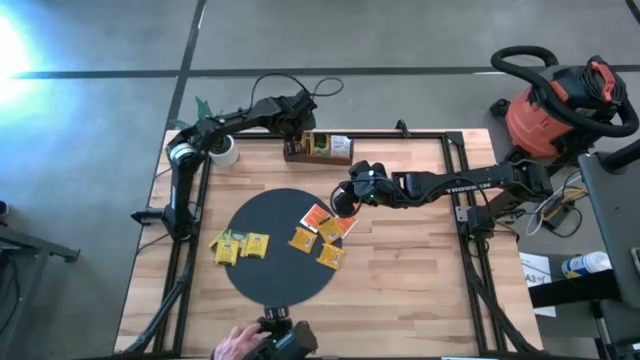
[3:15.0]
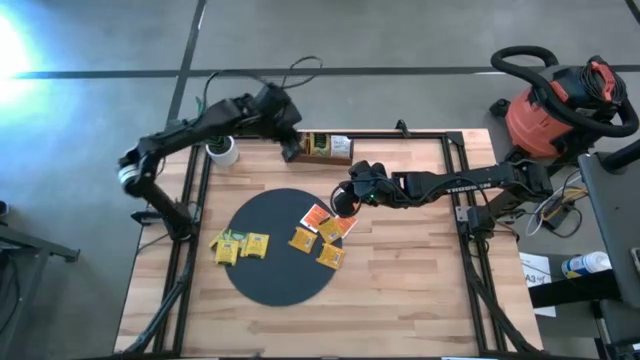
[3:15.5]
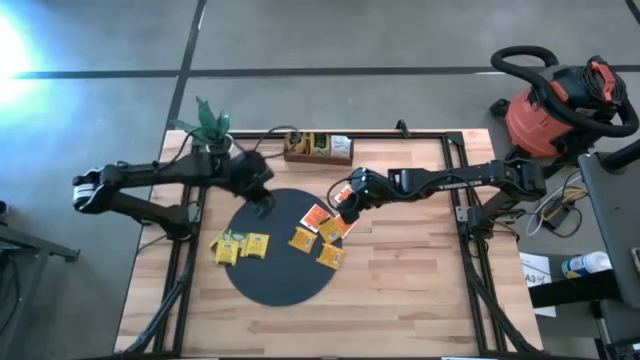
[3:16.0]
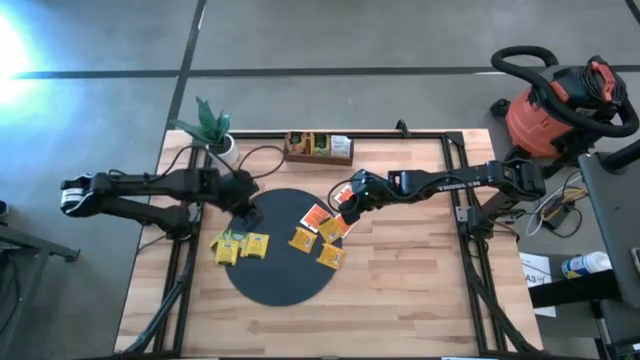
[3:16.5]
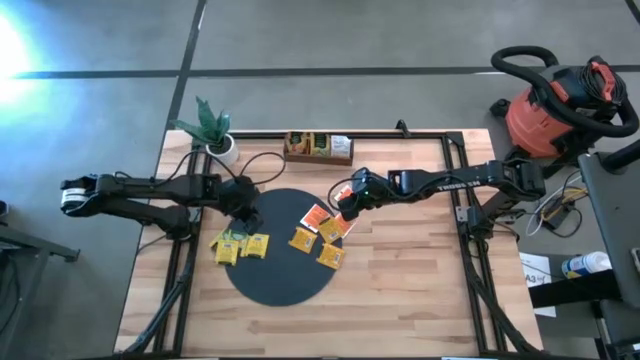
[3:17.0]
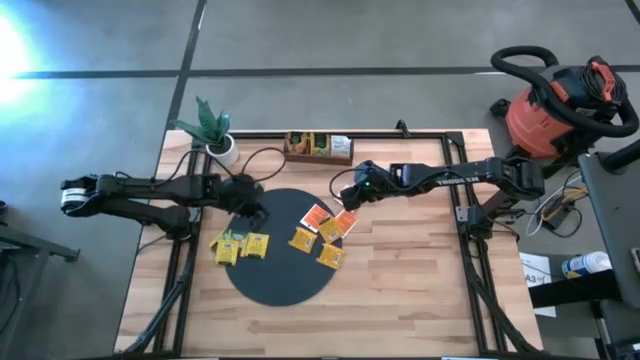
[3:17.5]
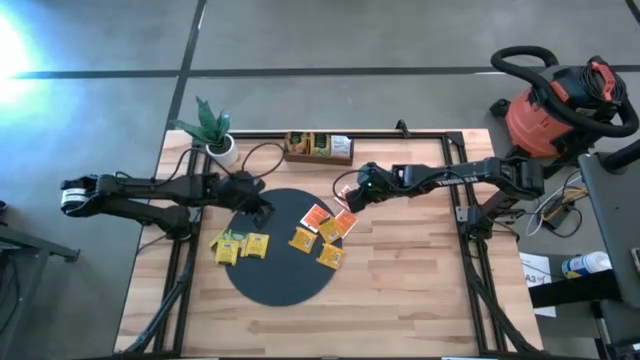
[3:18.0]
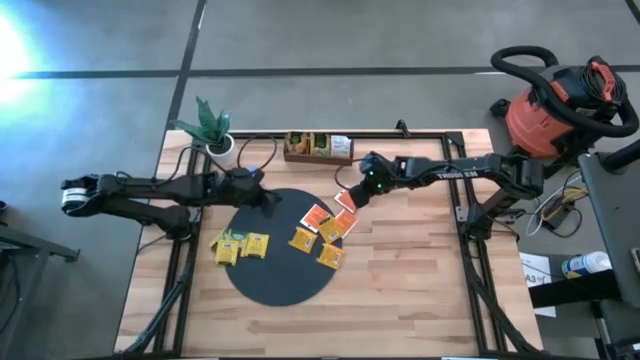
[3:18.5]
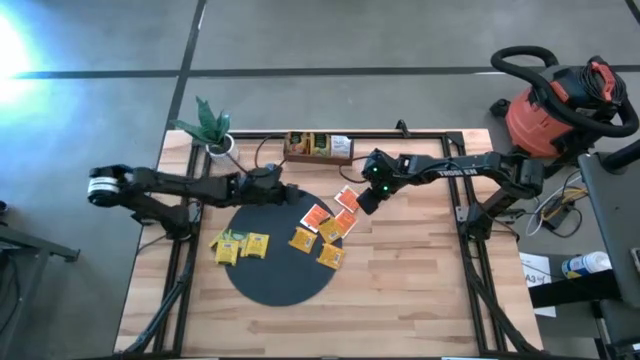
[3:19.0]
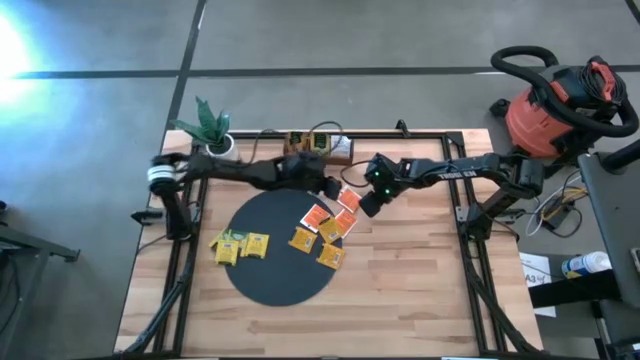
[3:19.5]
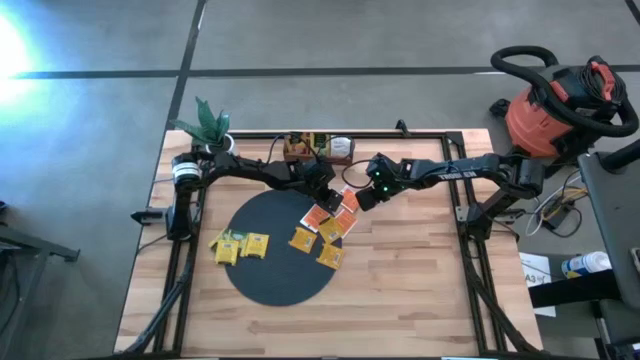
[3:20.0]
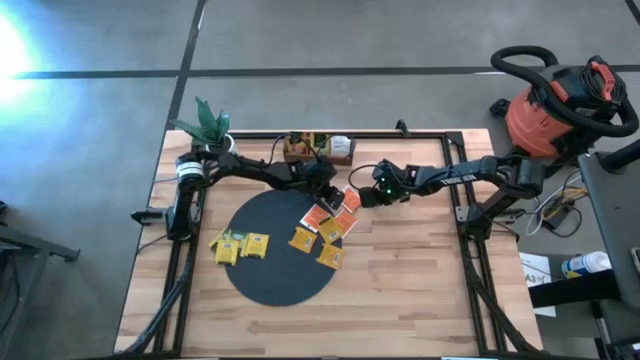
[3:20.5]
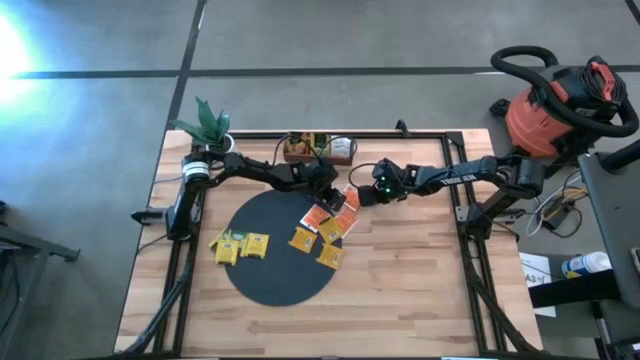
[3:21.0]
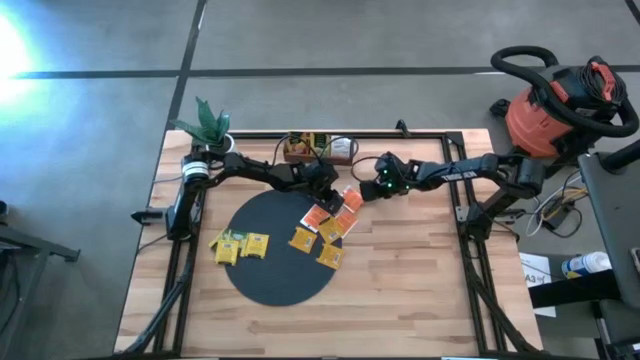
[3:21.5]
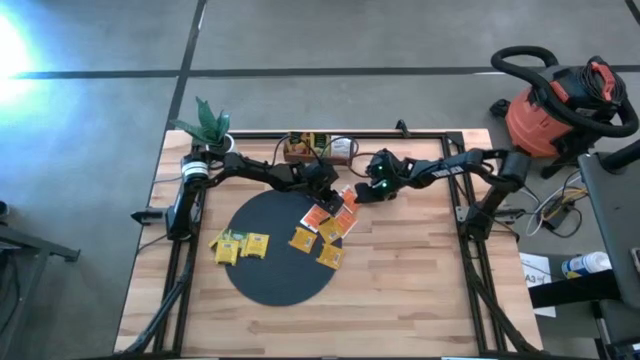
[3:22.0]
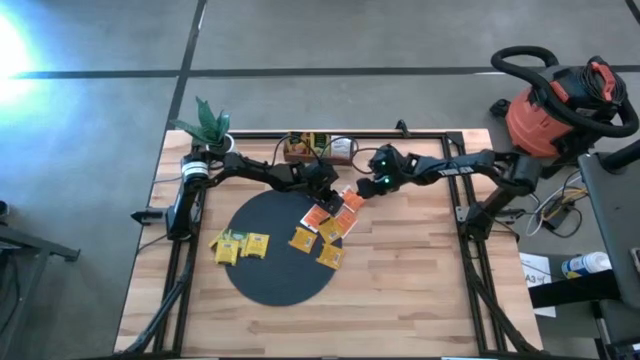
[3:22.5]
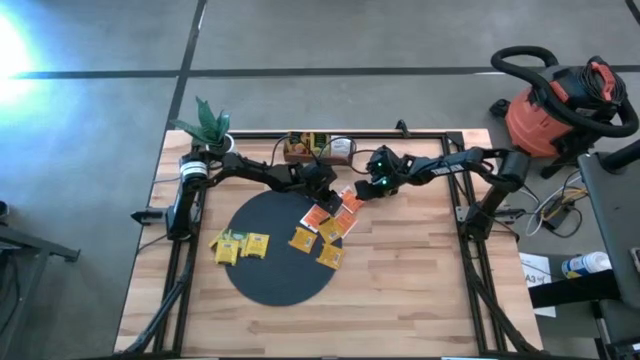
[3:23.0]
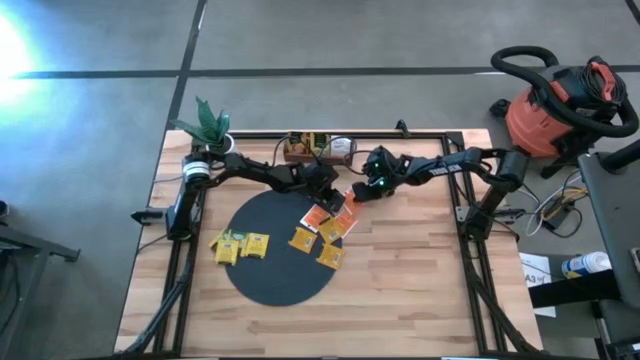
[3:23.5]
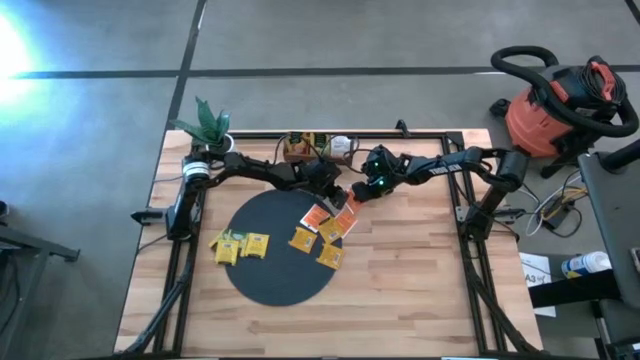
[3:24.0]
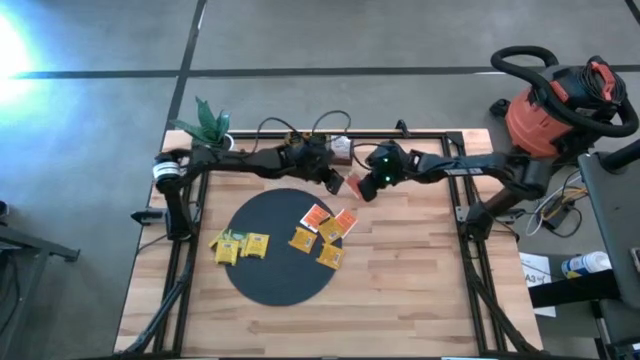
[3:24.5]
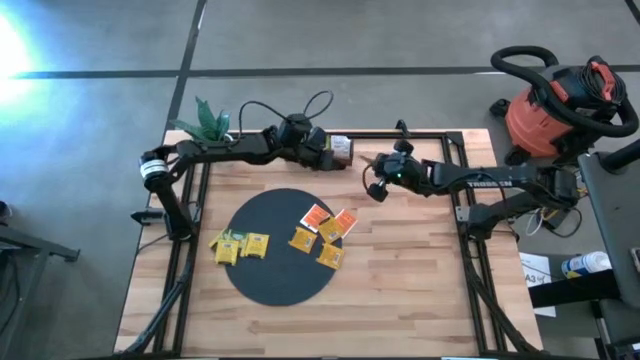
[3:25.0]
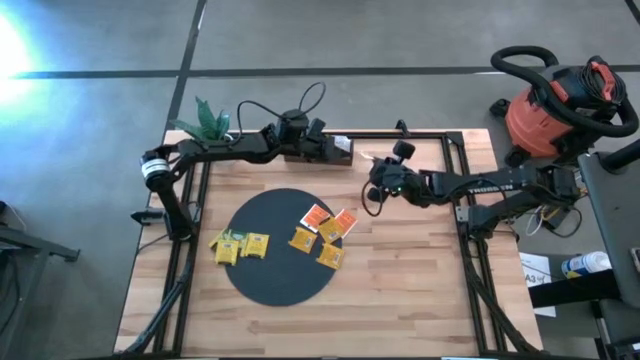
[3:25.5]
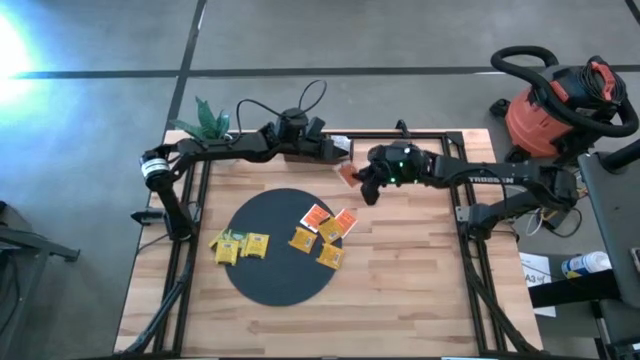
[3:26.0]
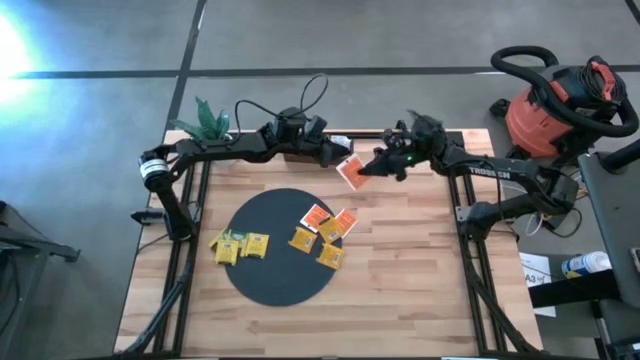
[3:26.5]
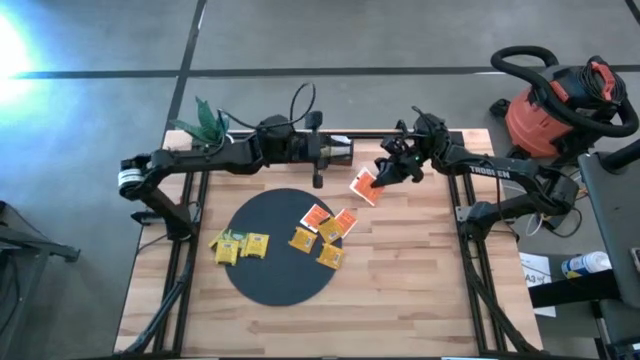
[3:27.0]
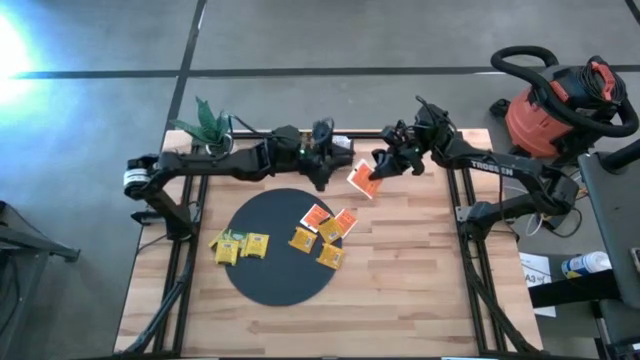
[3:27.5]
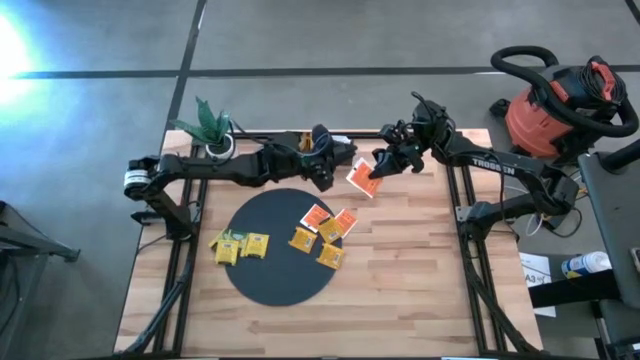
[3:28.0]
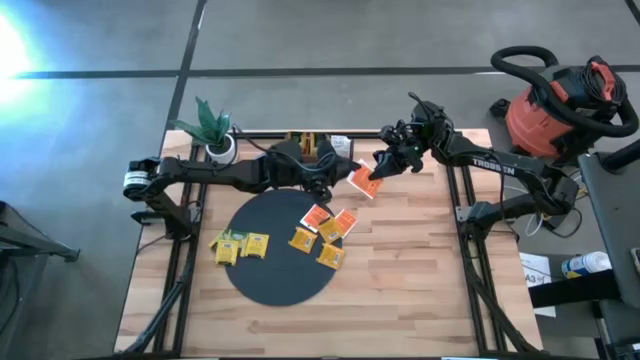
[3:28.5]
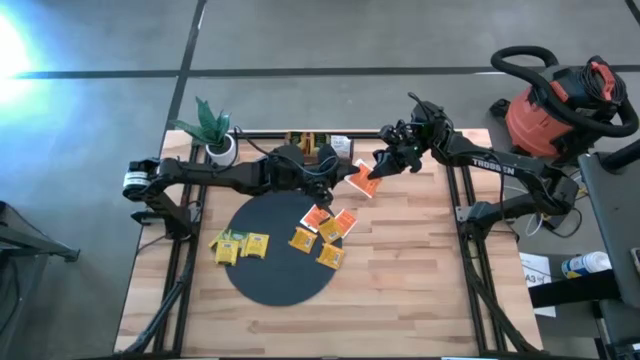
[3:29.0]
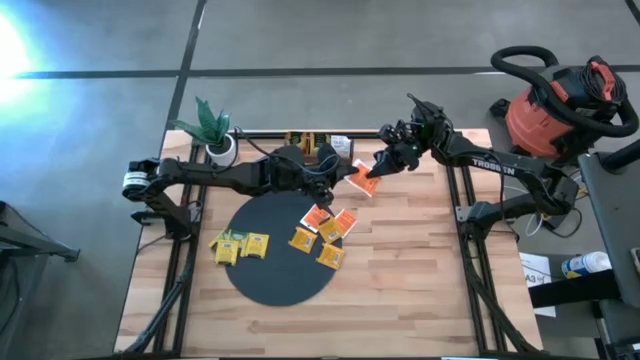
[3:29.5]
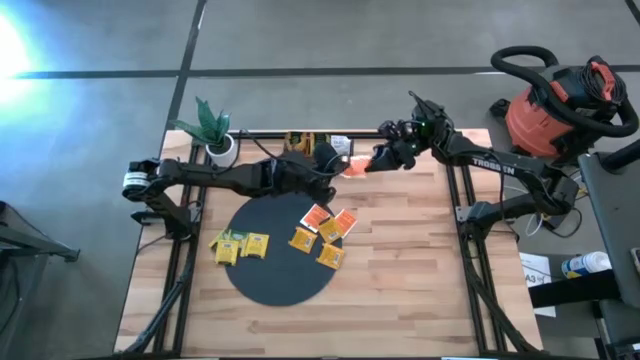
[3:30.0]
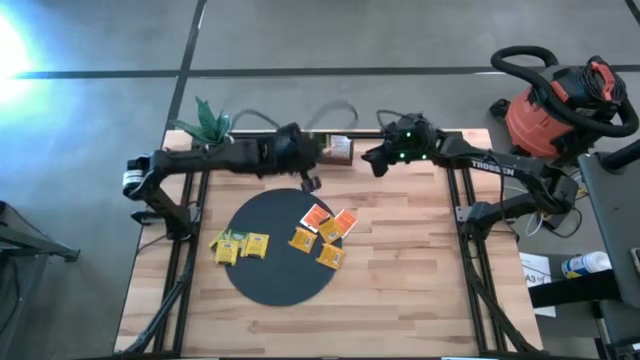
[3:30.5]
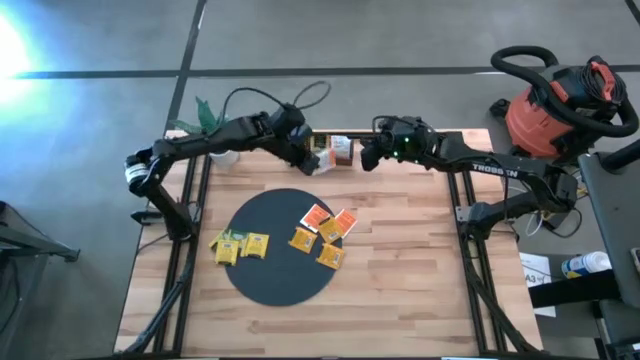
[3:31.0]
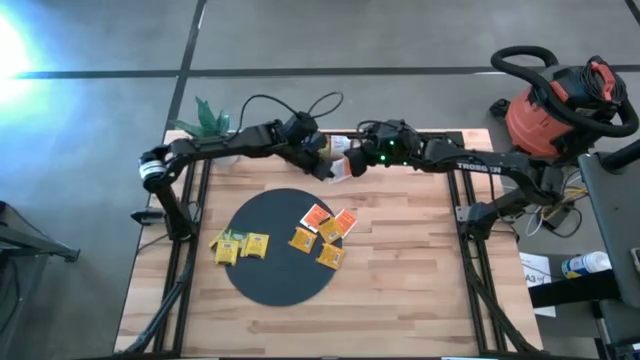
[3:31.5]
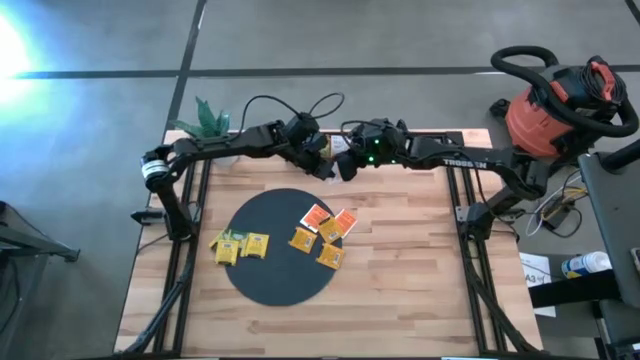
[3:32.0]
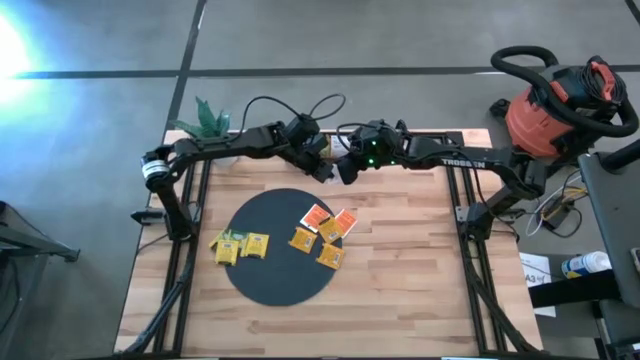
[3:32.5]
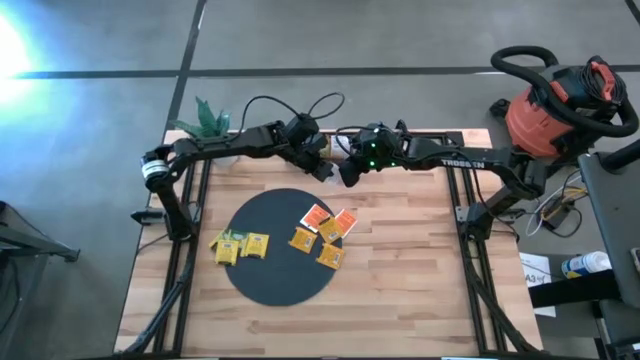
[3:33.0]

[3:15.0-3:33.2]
Task: Pick & Place Tea
Put the white tea bag into the right section of the wooden organizer

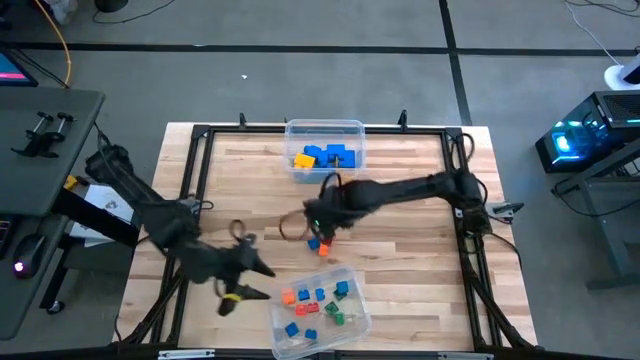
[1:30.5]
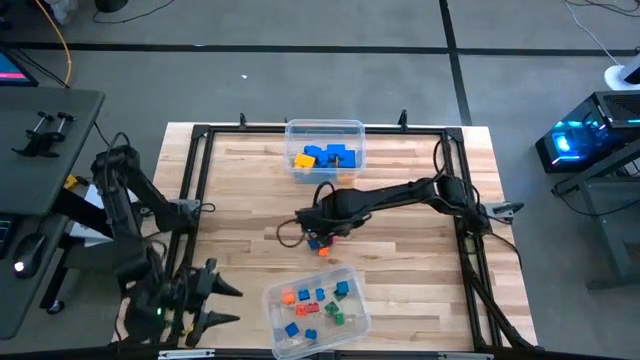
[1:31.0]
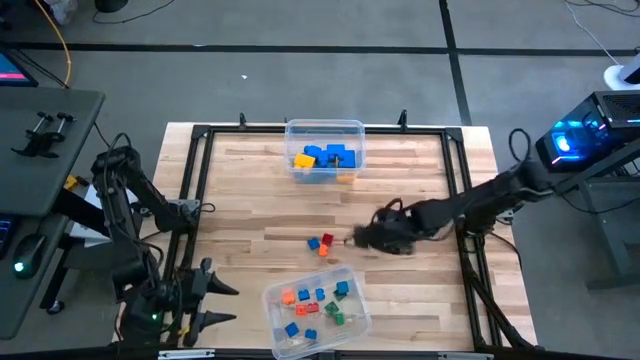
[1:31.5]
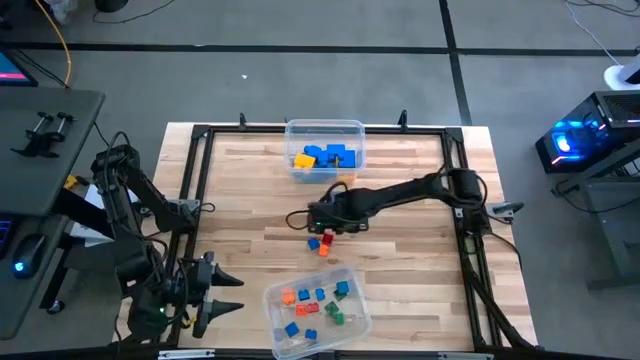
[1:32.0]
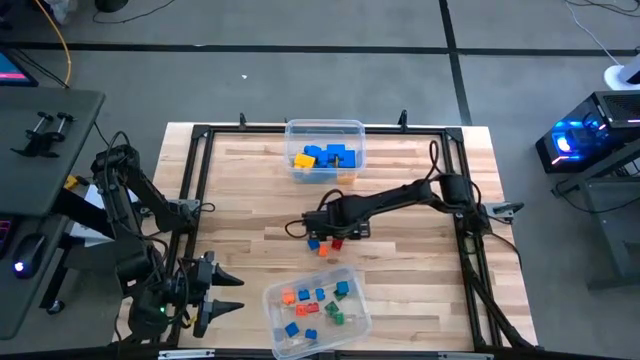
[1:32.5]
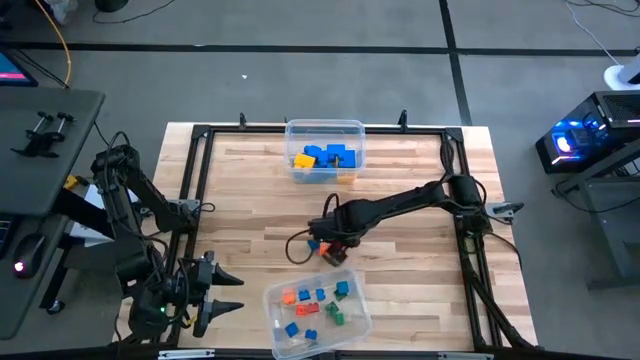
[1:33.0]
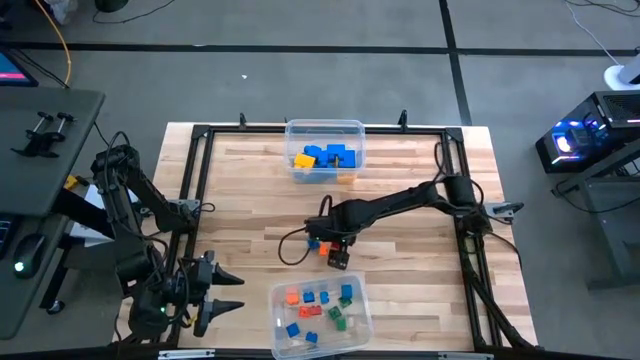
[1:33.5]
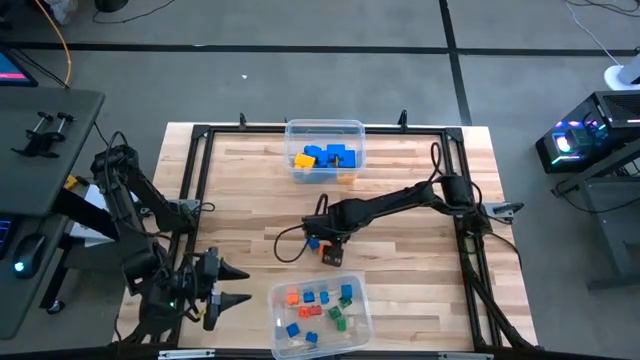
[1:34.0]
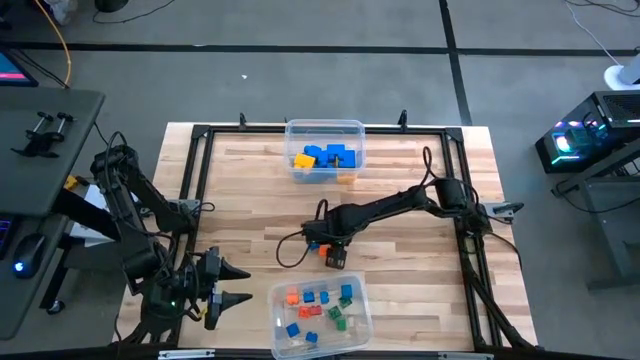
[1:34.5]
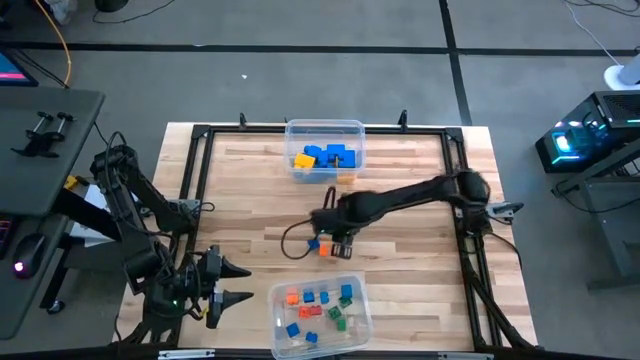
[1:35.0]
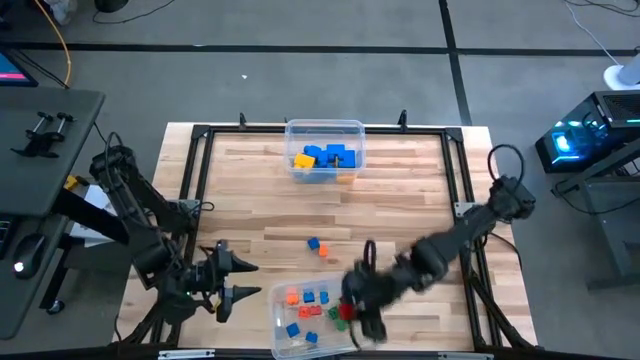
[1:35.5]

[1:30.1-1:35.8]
Task: Sort blocks by size
Put the small red game piece into the bottom transparent bin
